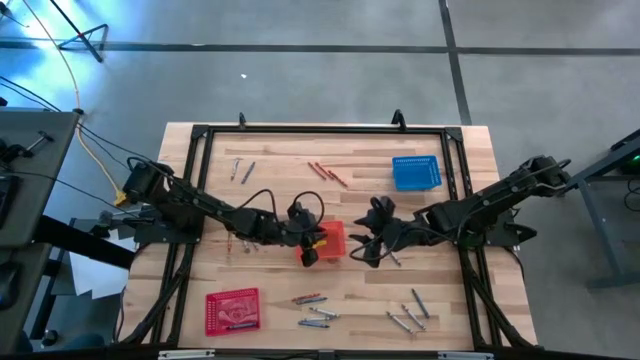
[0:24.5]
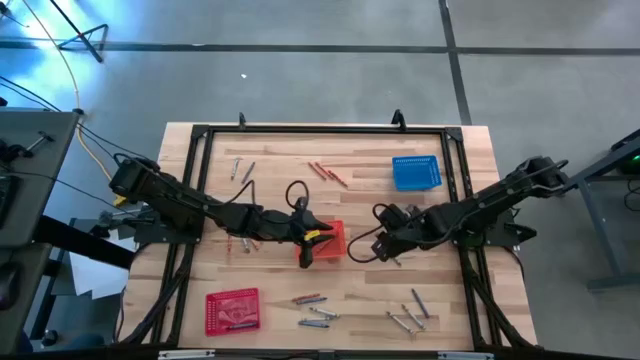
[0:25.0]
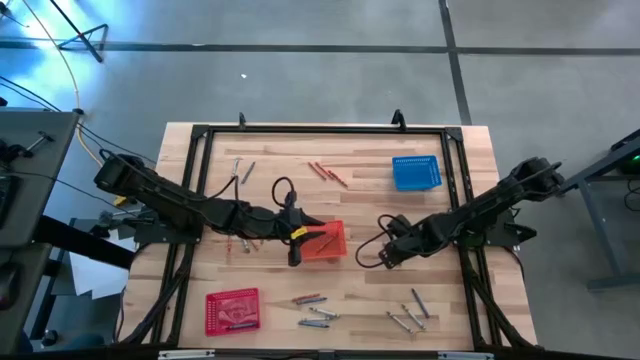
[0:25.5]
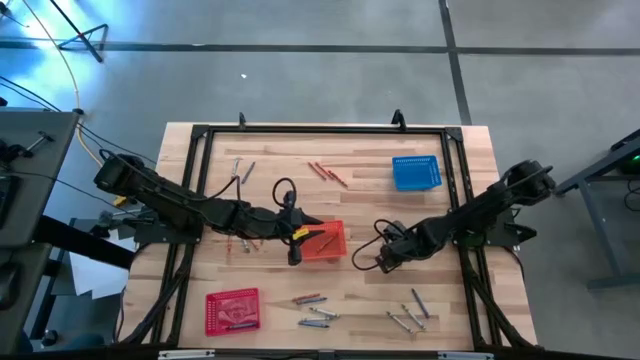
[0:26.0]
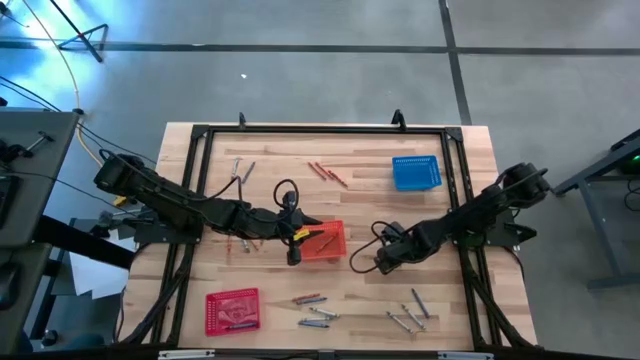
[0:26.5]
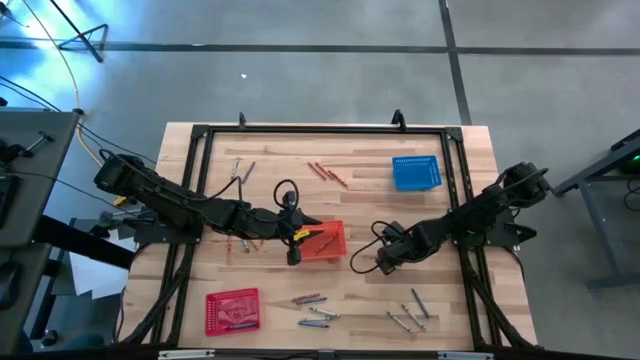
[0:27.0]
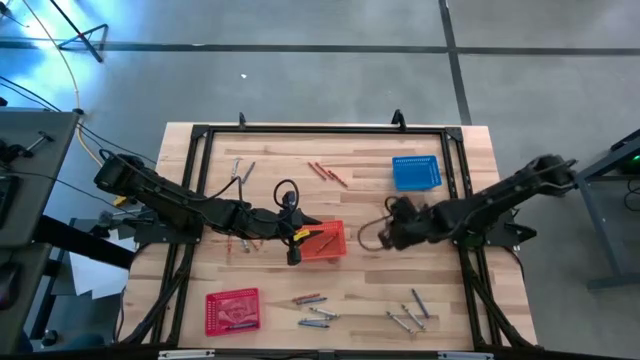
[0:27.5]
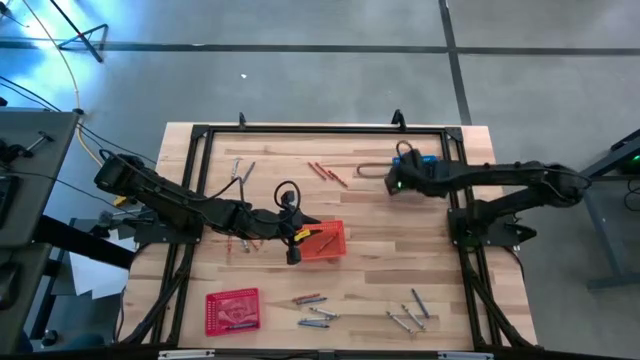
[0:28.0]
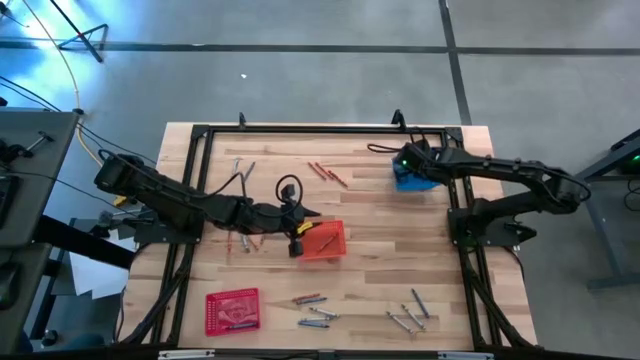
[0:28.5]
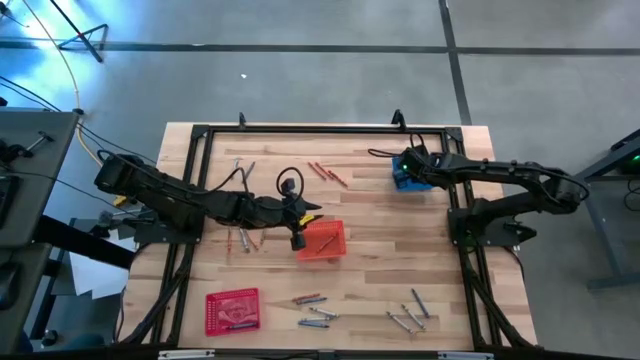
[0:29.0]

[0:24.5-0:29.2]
Task: Sort crayons
Put the gray crayon into the blue bin

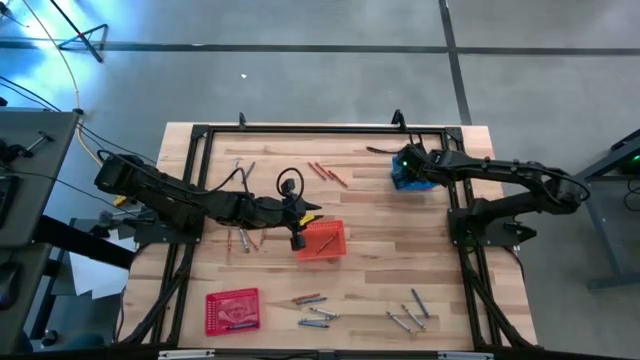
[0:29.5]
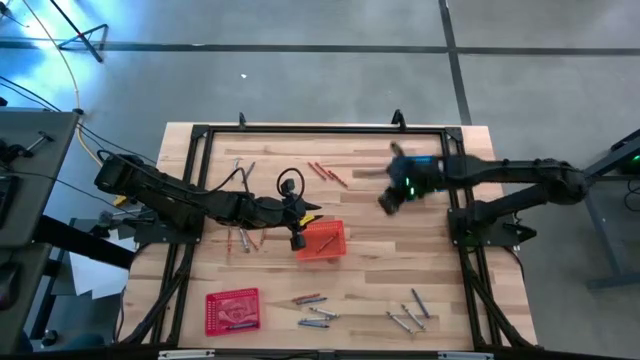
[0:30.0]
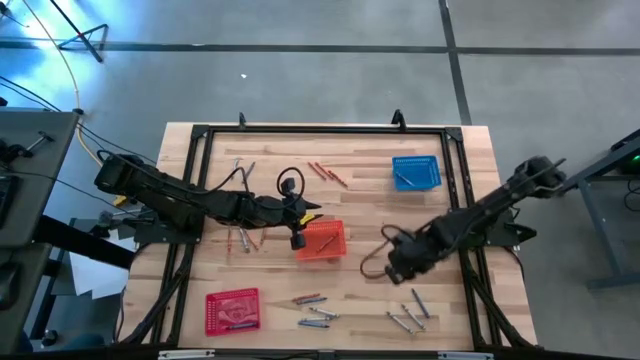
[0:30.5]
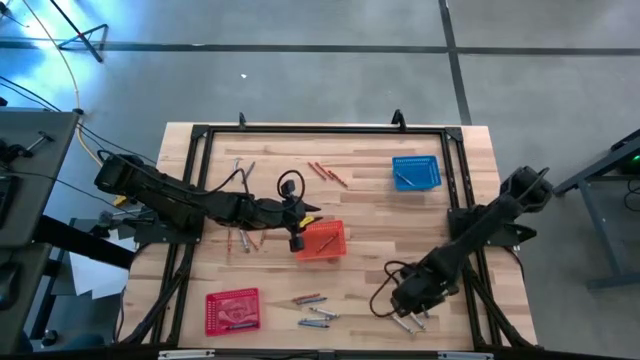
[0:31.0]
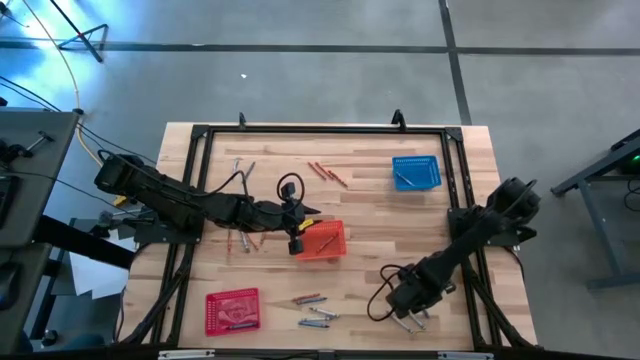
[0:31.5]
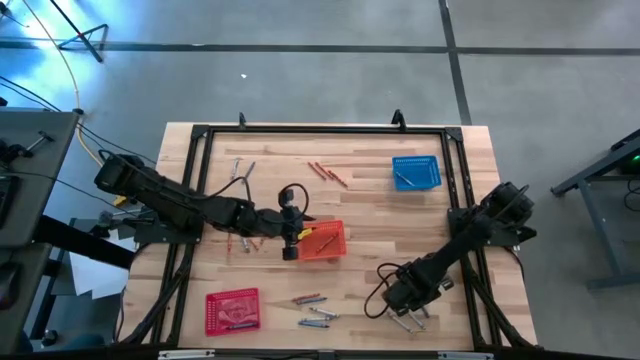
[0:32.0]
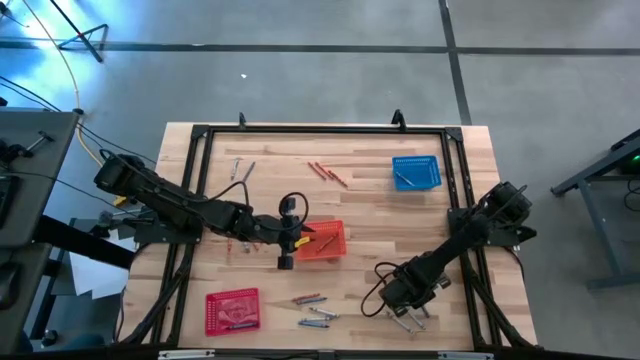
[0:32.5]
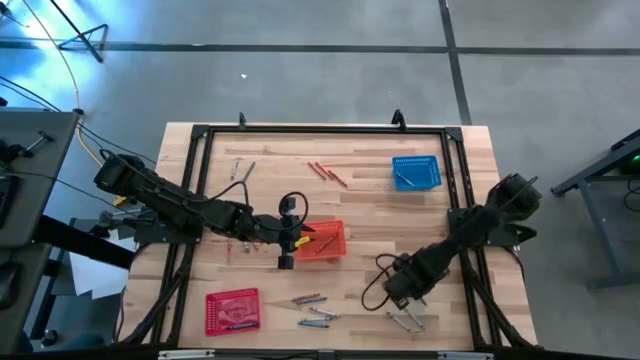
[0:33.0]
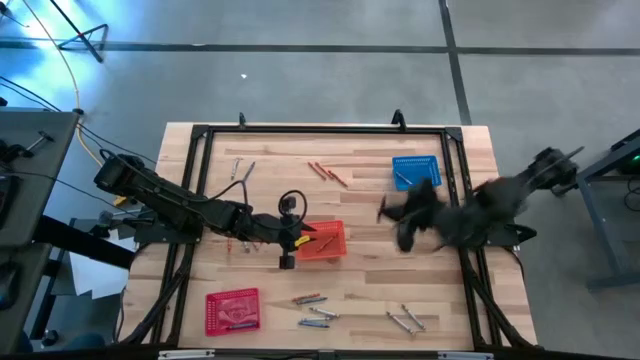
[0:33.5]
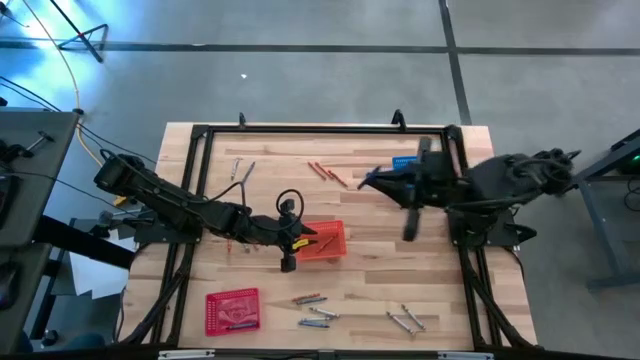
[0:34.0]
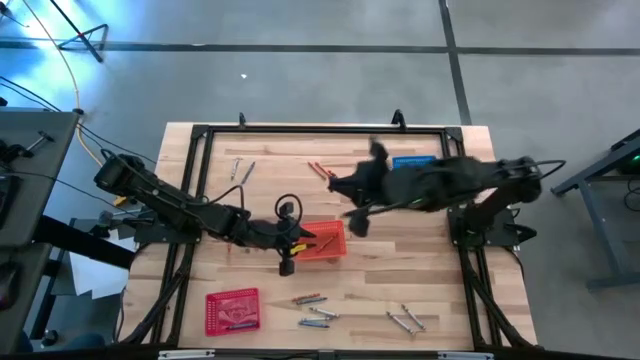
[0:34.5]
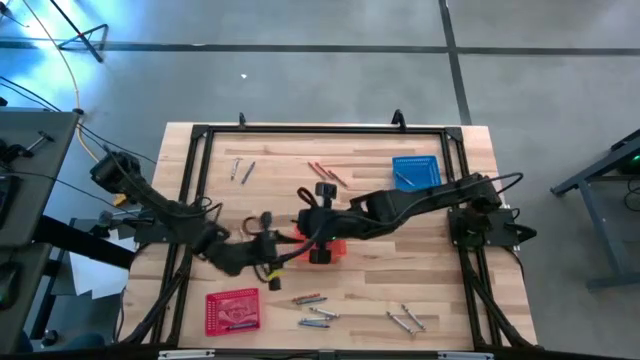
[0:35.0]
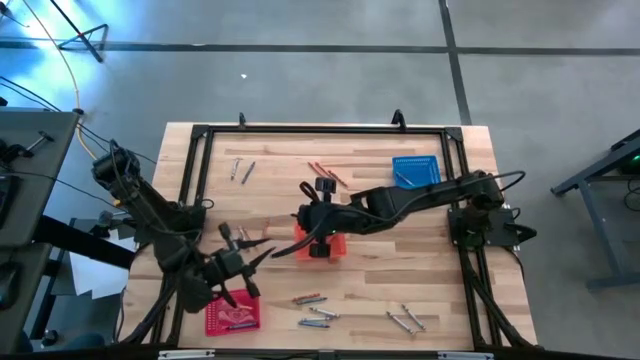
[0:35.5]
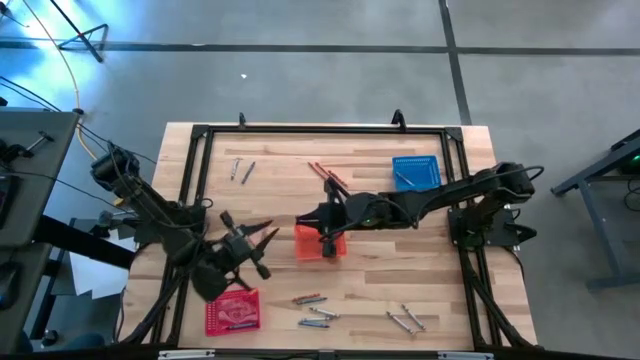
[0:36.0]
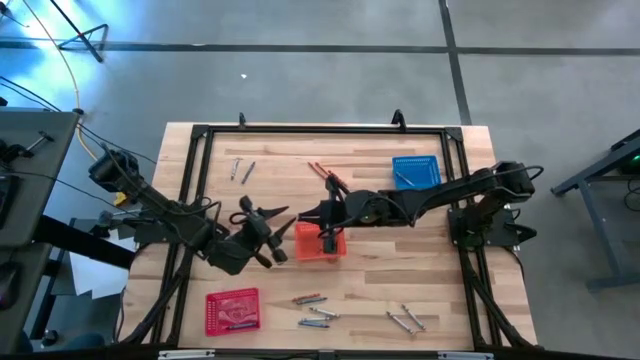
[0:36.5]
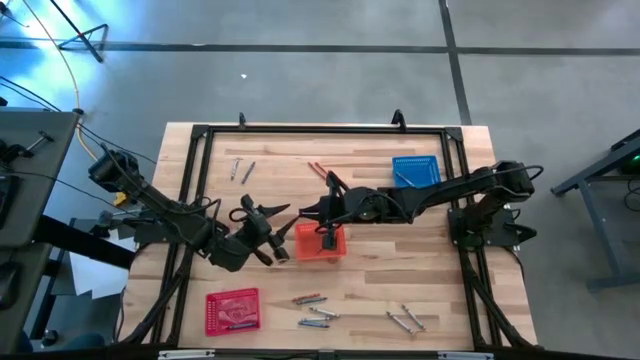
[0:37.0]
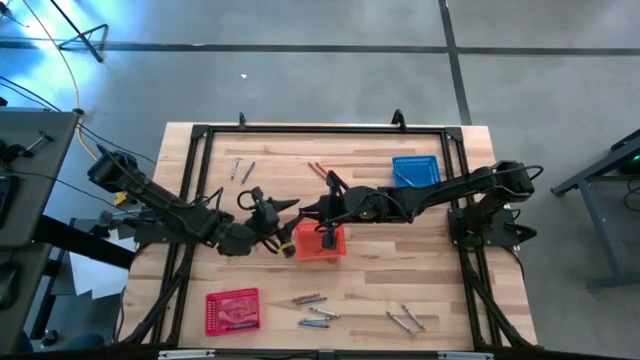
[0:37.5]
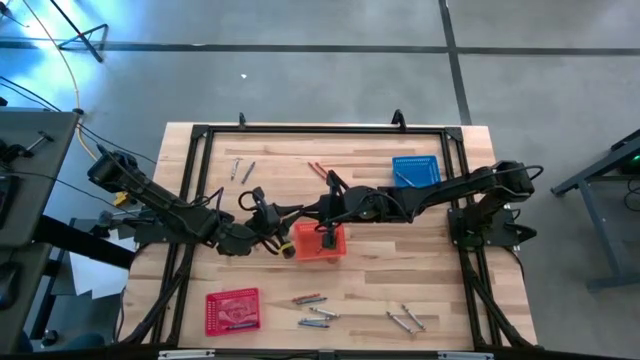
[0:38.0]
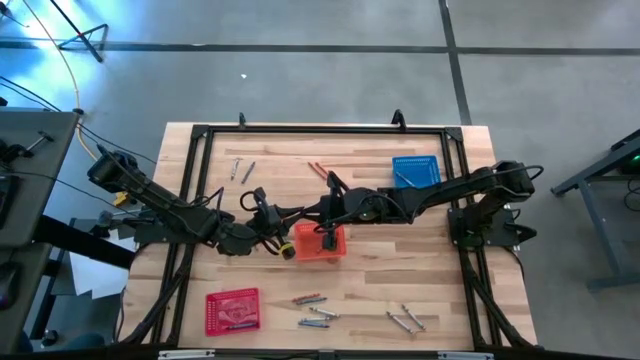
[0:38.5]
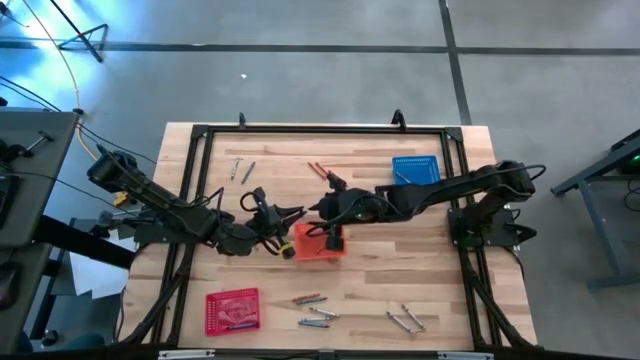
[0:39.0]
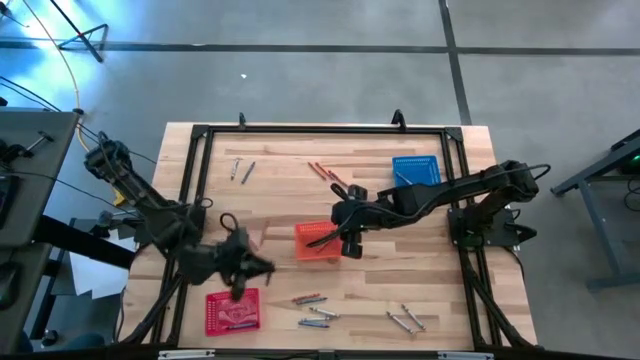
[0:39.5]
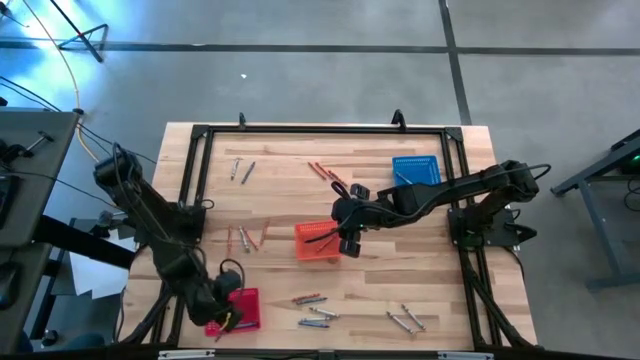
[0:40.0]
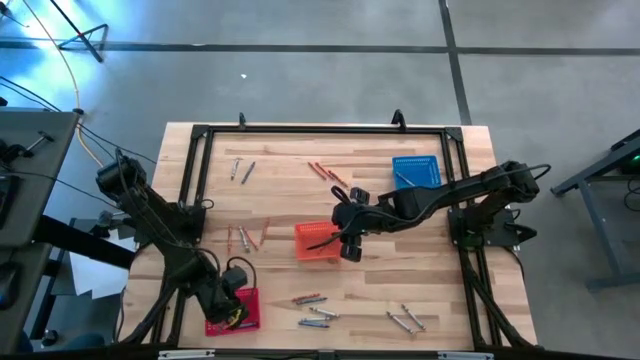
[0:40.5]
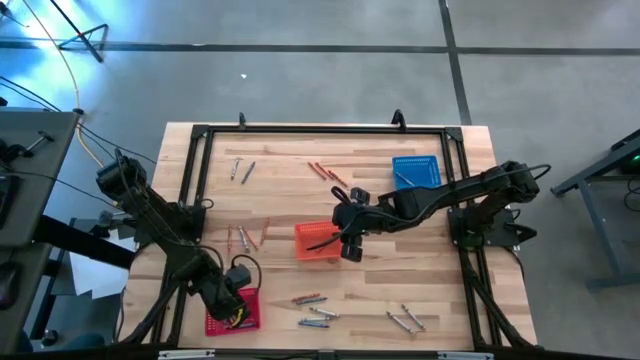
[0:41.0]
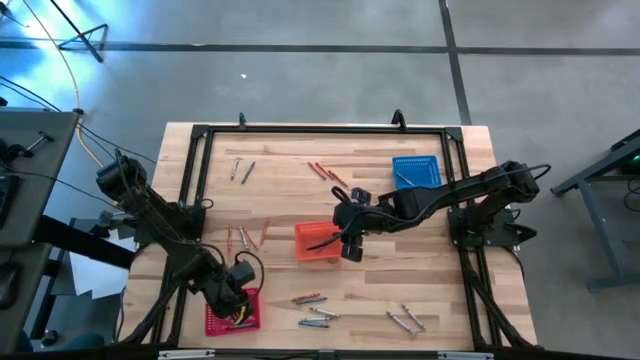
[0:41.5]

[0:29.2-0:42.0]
Put the blue crayon into the red bin

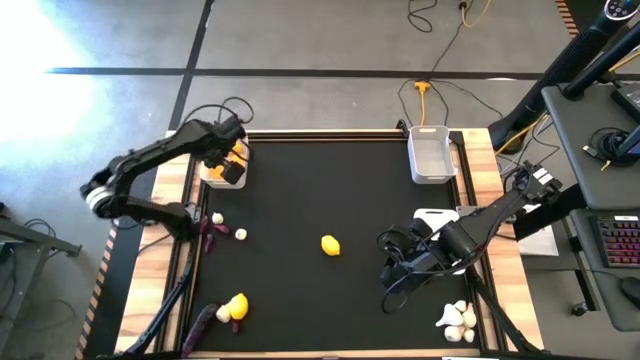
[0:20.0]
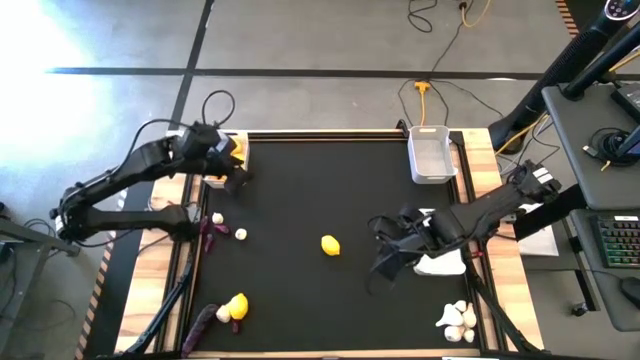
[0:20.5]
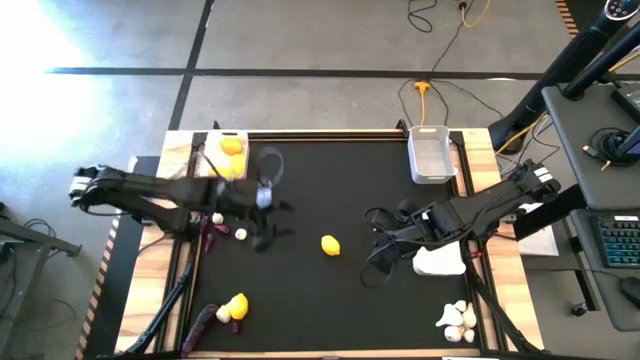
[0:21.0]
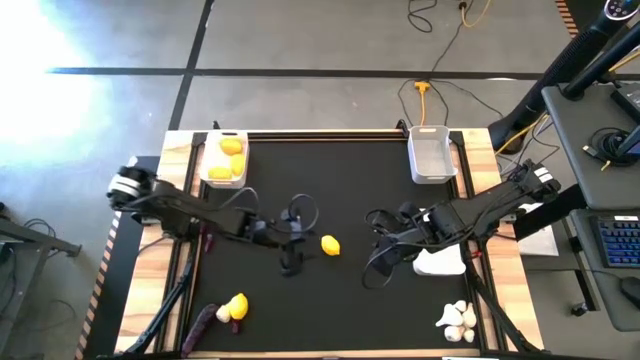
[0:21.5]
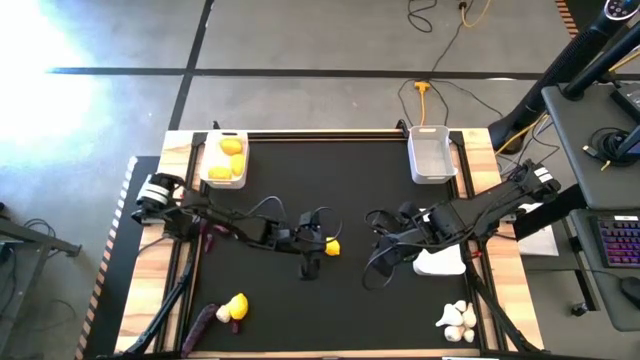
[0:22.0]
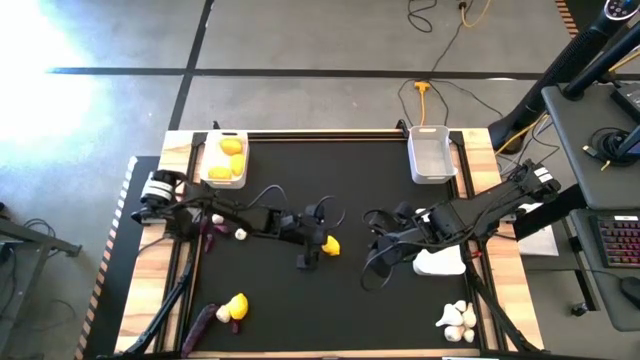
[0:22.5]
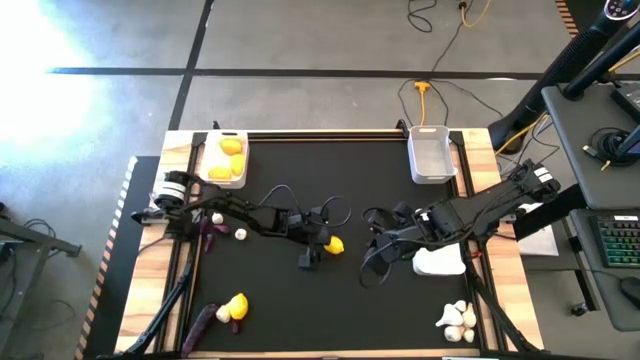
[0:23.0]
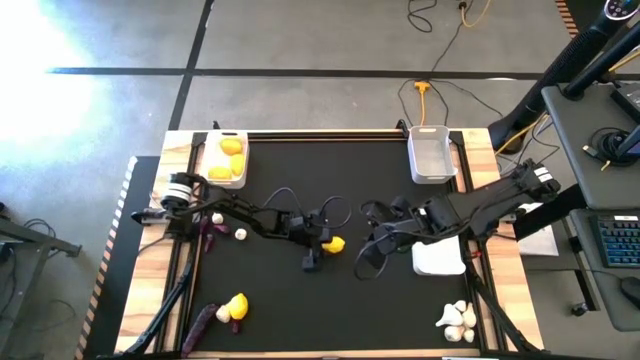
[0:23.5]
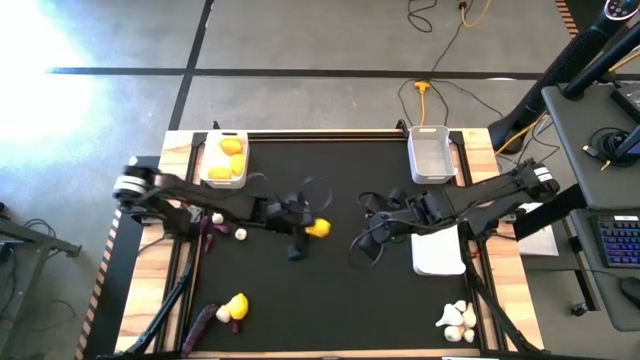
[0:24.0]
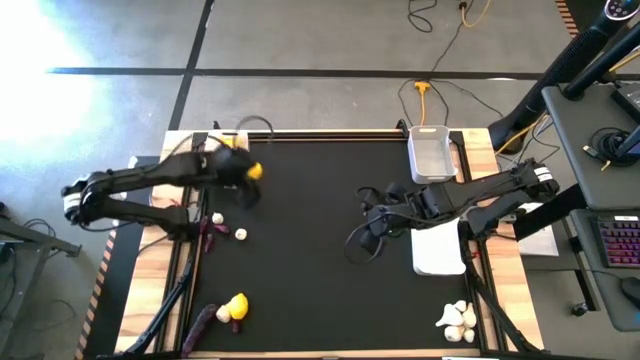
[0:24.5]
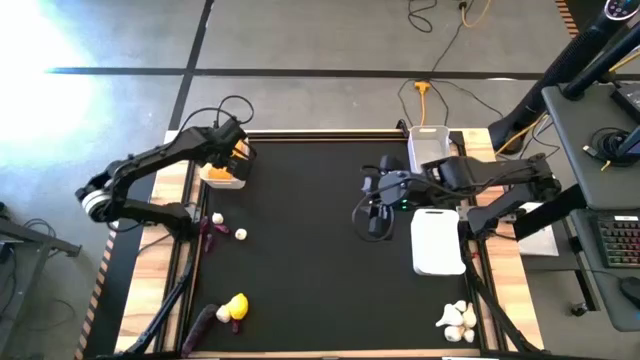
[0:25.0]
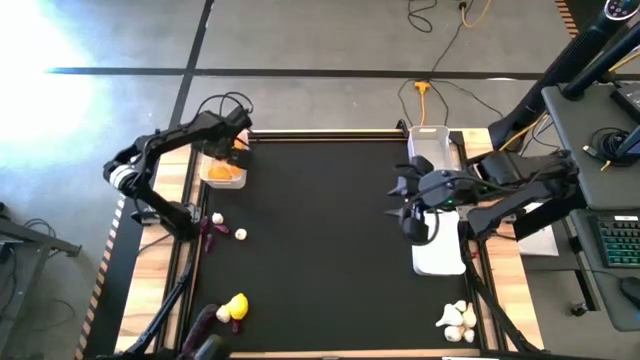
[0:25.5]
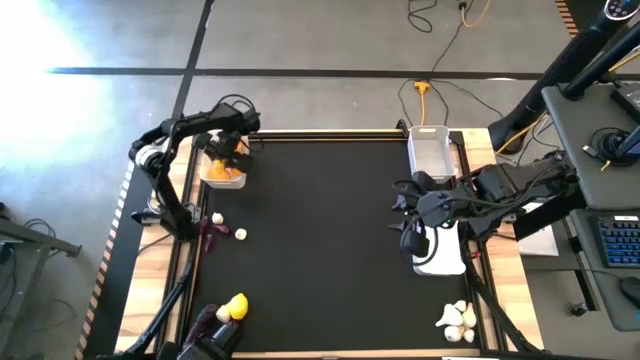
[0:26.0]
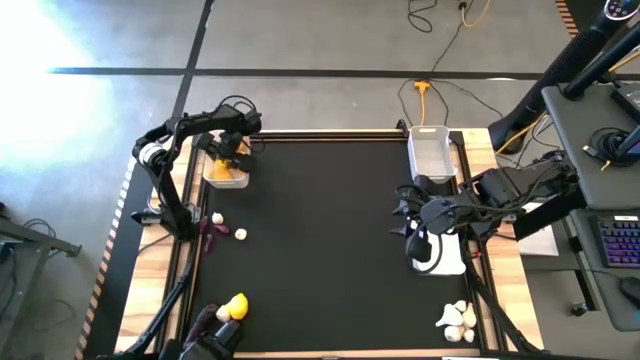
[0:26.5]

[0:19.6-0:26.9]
Task: Sort produce into baskets
Put the top yellow lemon into the left white bin
